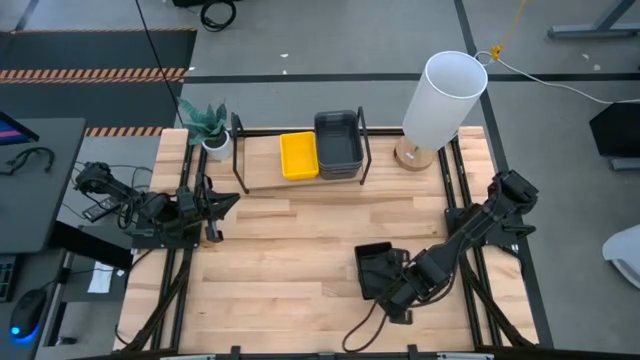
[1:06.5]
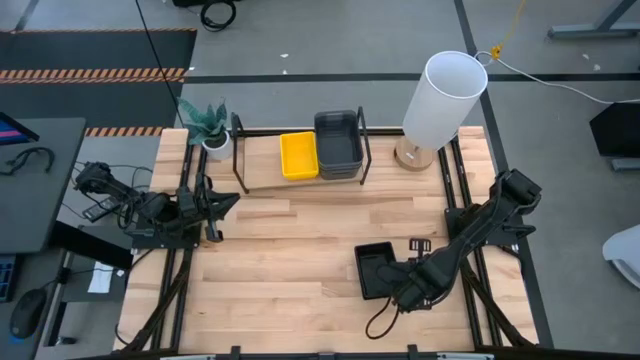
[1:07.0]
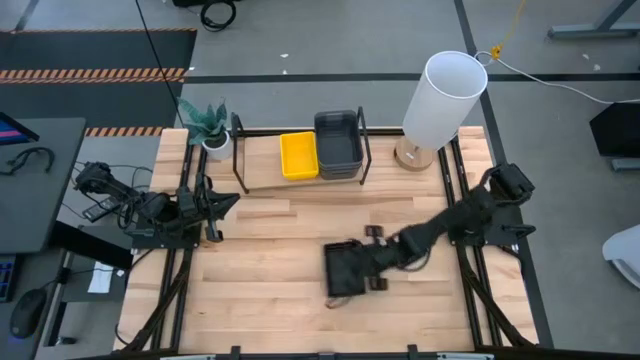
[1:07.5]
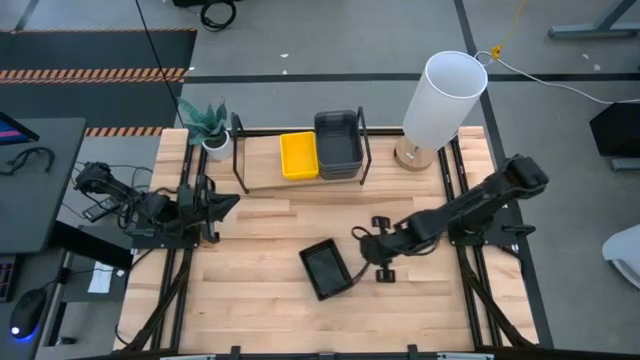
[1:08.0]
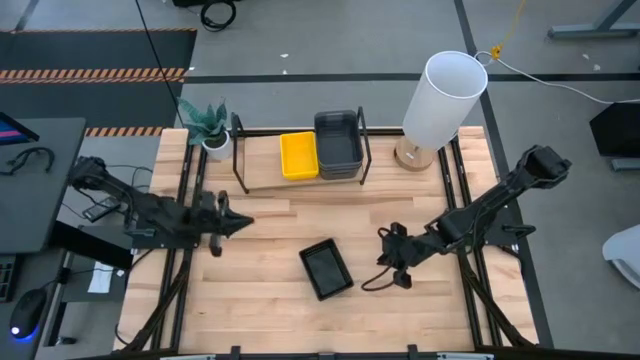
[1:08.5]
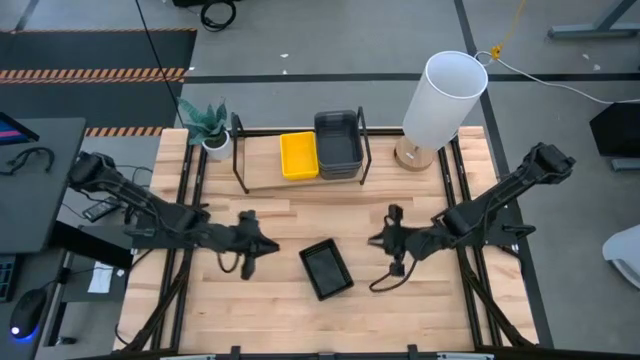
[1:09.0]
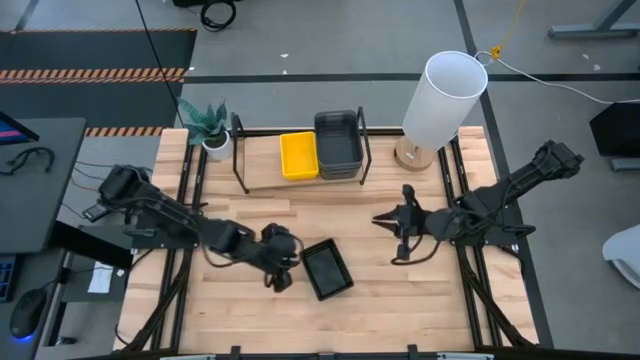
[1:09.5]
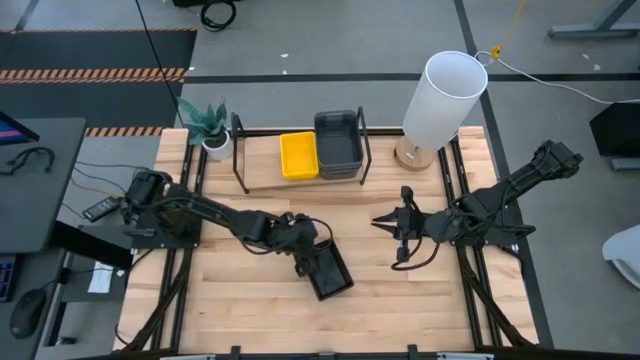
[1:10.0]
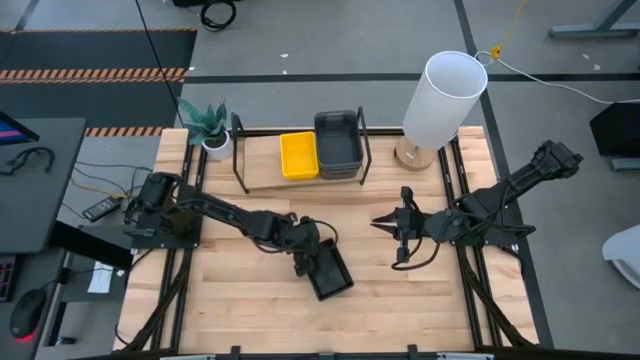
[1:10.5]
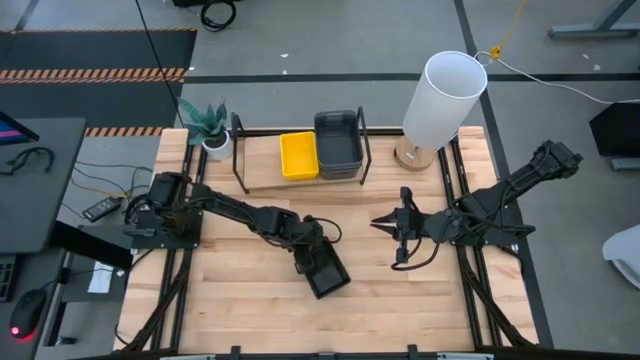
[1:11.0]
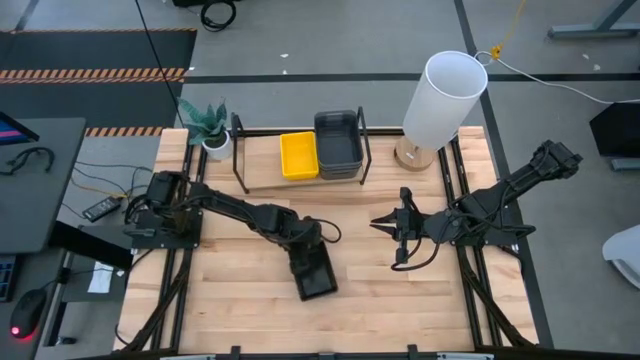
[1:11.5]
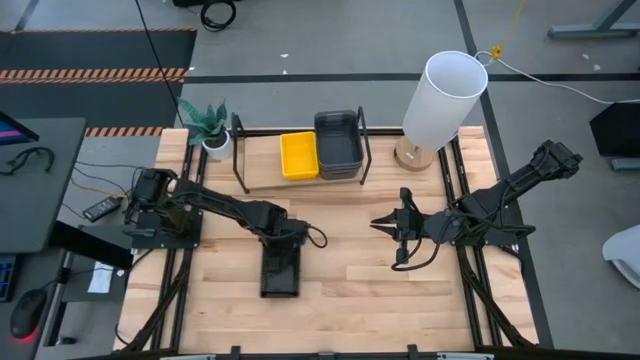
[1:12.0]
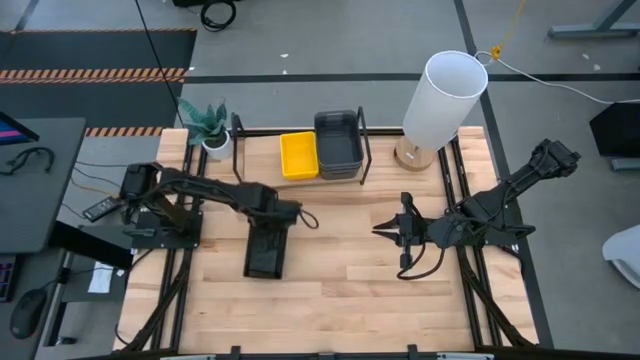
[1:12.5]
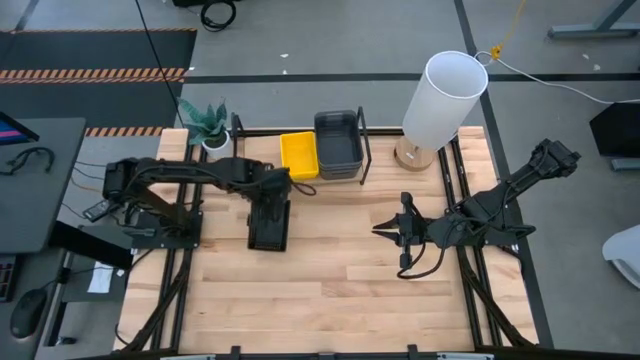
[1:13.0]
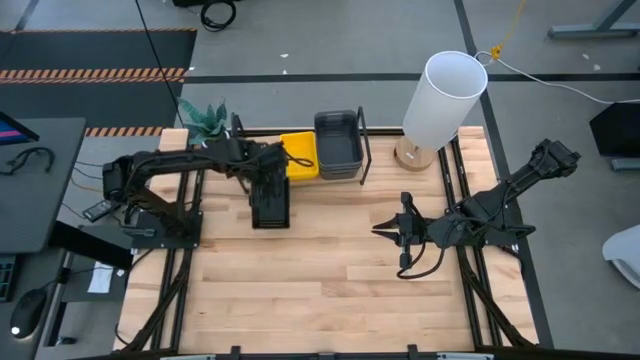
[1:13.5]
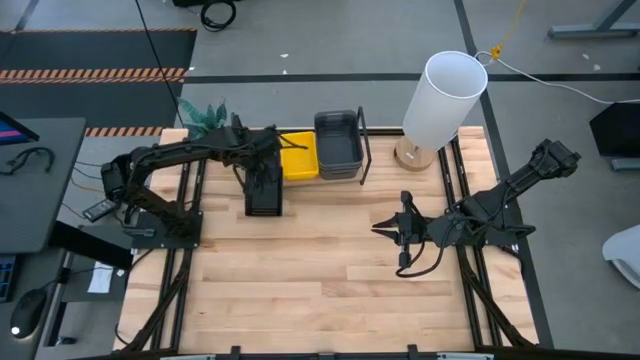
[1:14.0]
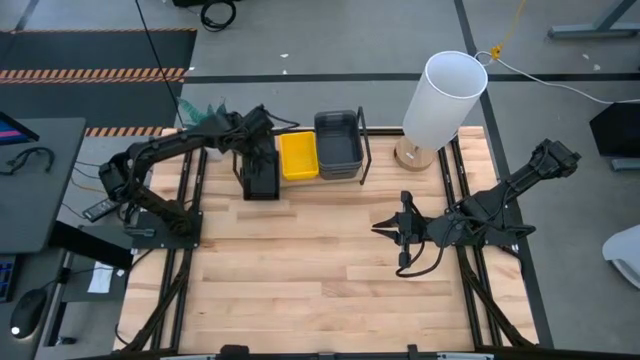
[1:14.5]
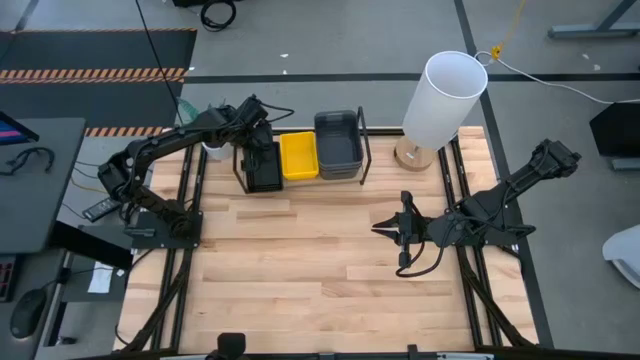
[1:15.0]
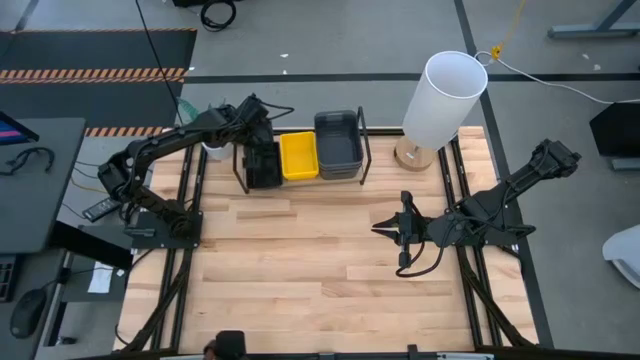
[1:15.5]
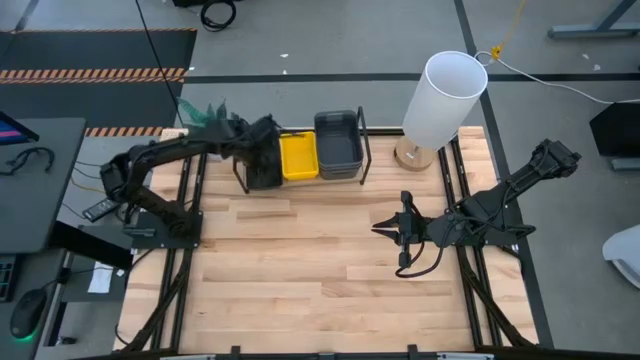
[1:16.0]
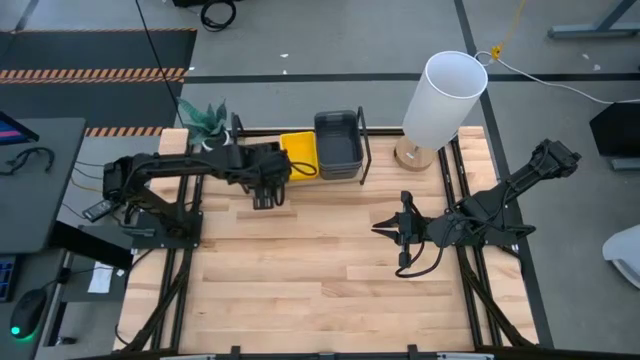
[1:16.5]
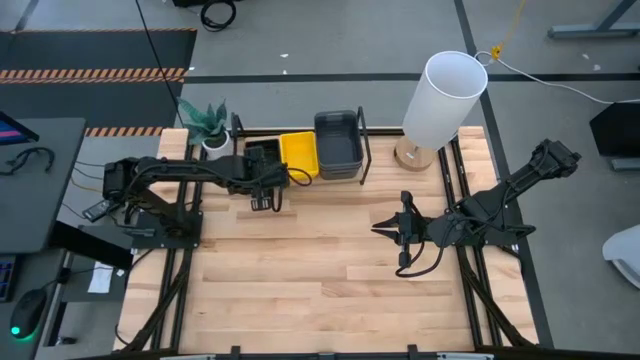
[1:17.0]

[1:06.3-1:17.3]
Task: Stack baskets on shelf by color
Put the stacked small black bins on the shelf

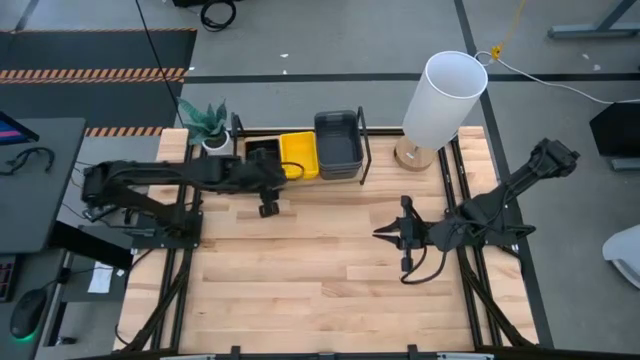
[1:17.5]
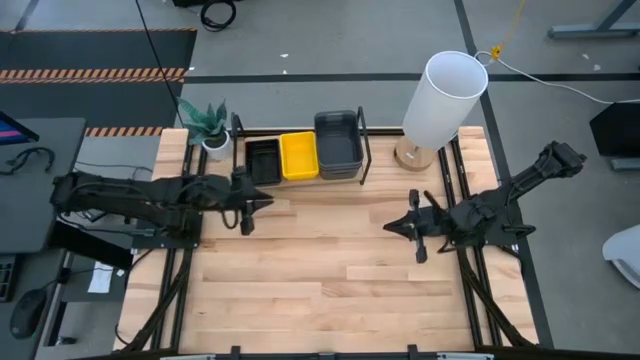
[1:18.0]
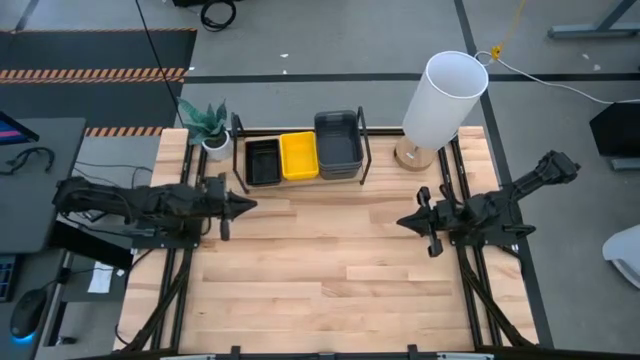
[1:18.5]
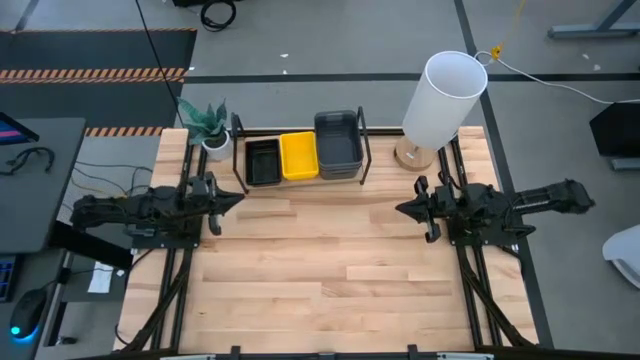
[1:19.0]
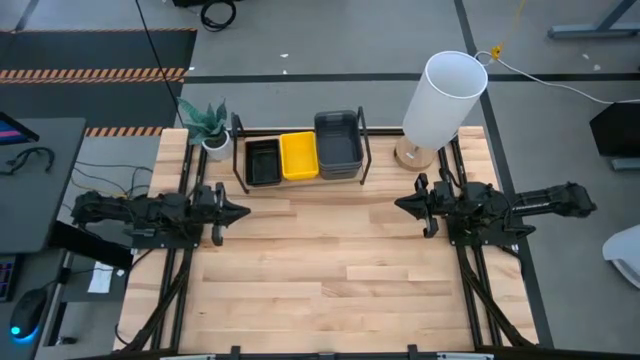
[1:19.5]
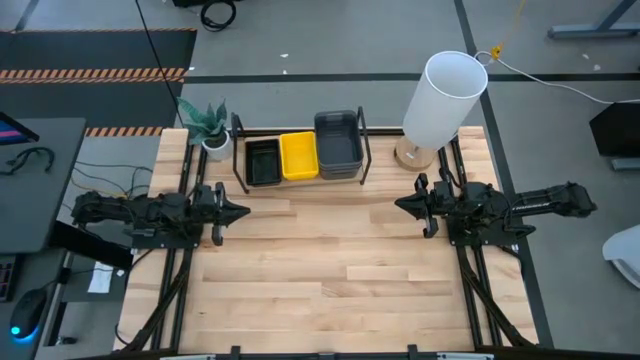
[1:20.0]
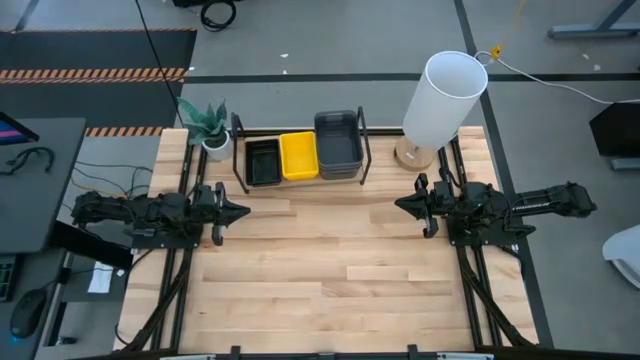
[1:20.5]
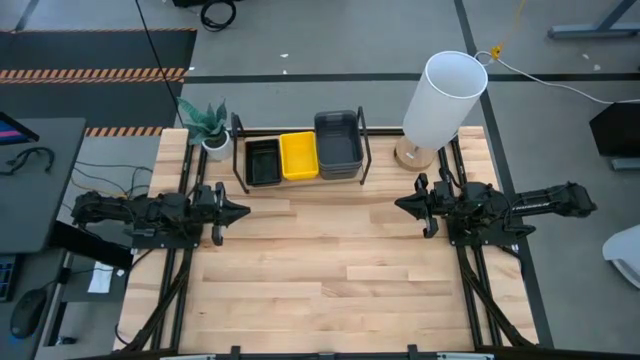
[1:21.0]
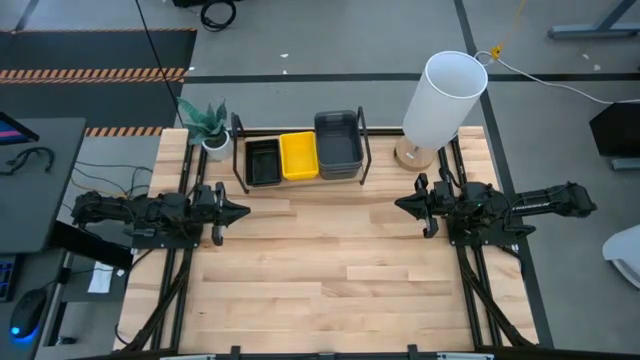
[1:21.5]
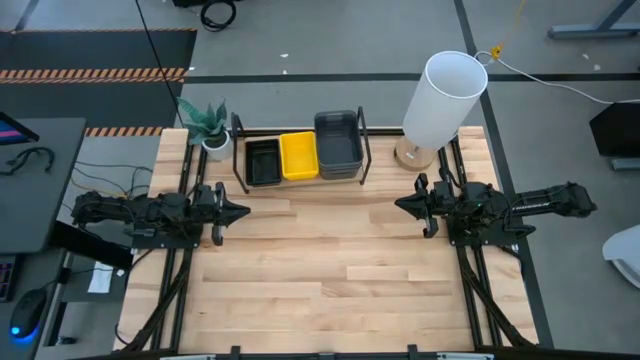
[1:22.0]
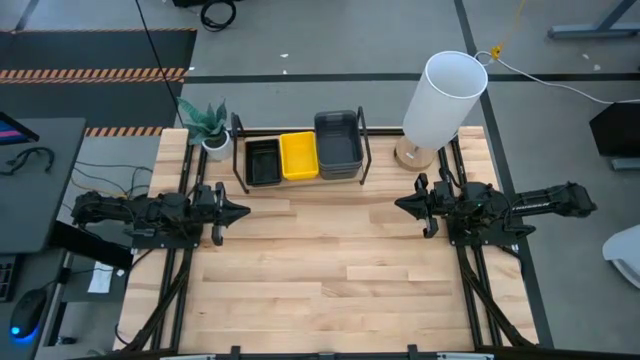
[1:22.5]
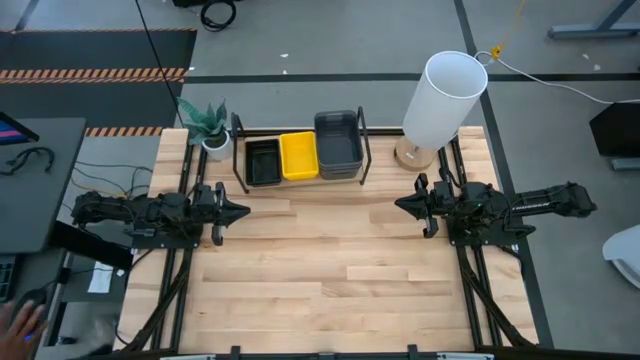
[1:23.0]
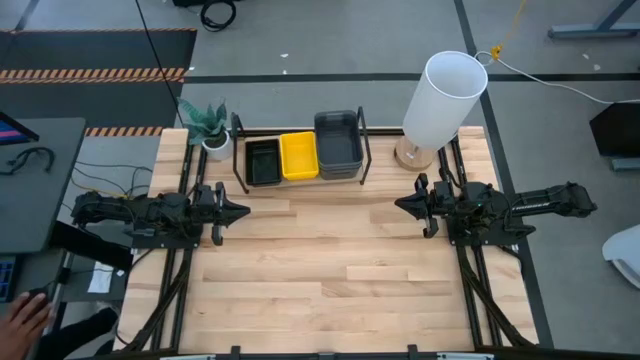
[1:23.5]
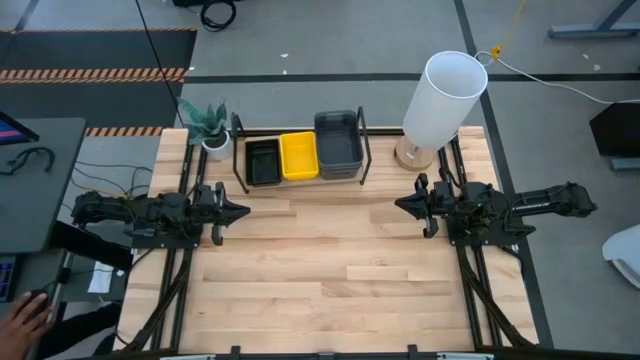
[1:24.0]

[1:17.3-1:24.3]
Return to Home Position

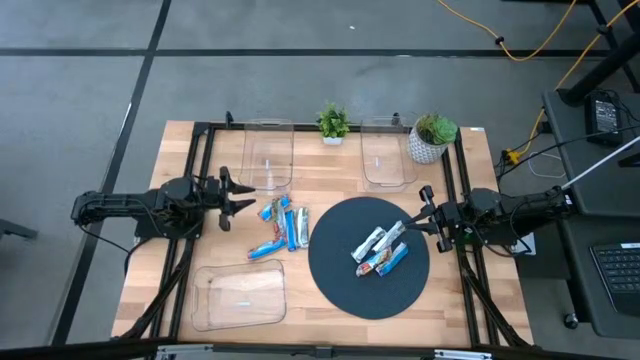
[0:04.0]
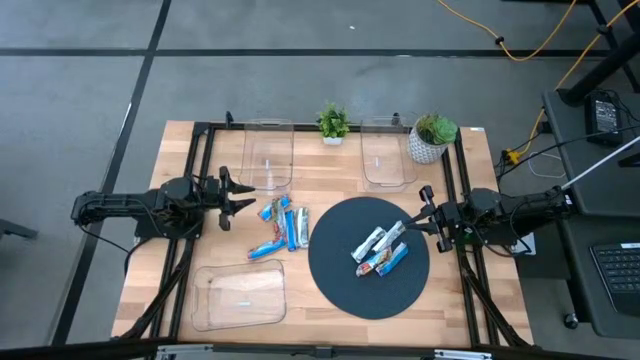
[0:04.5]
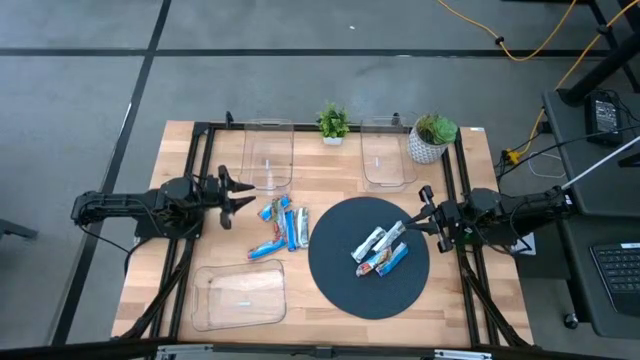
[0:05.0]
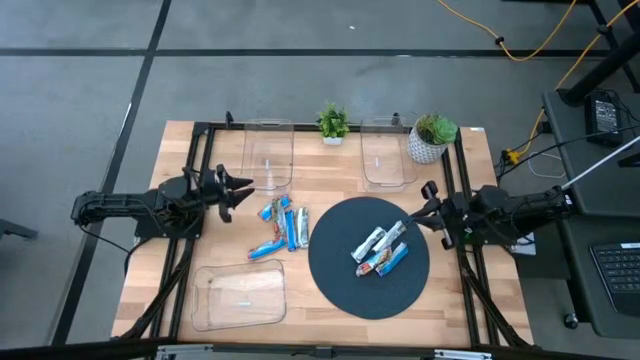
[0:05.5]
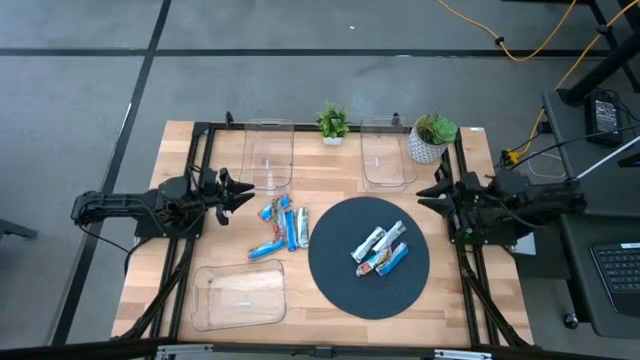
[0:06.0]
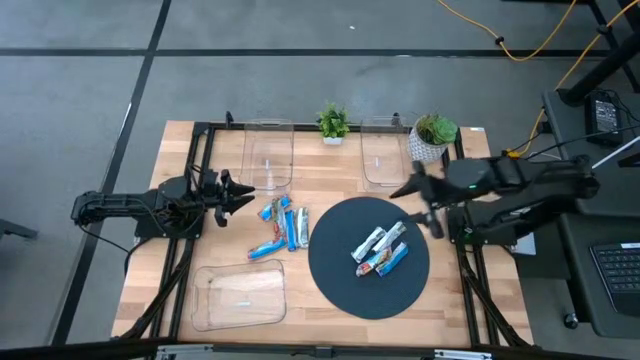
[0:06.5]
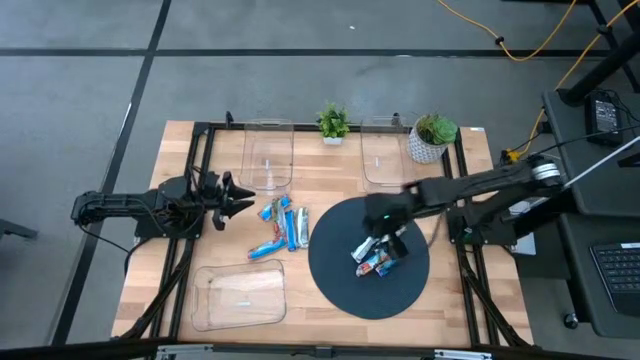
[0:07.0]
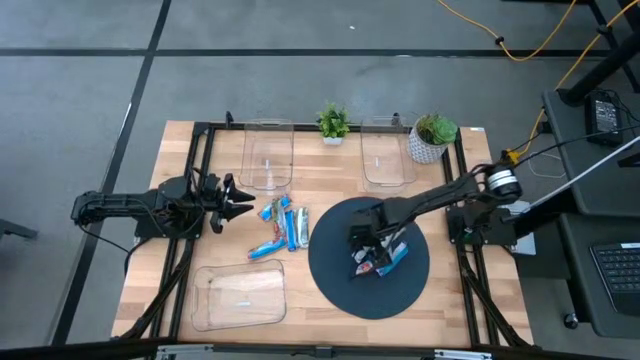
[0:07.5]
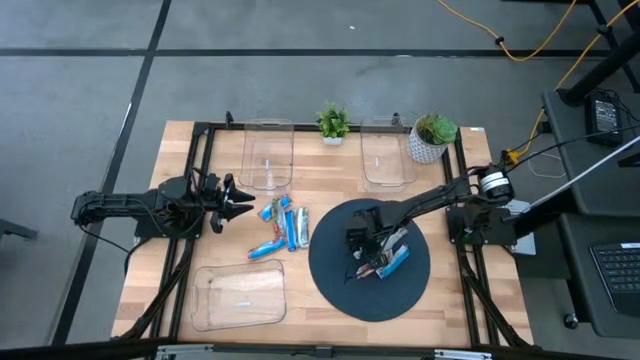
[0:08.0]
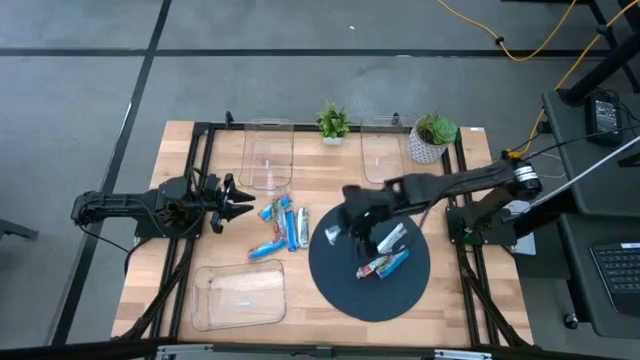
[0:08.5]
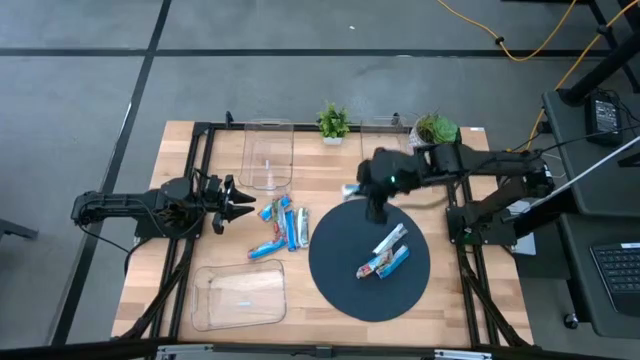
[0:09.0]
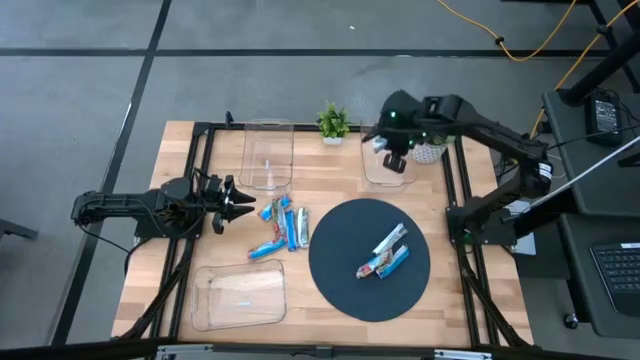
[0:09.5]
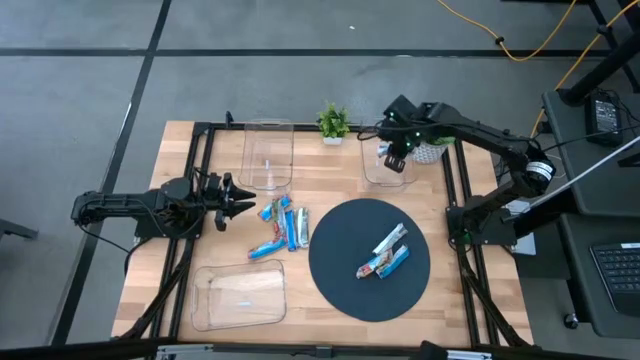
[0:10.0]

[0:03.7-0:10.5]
Task: Pick and place Granola Bars by type
Put the yellow granola bar into the top right transparent bin
